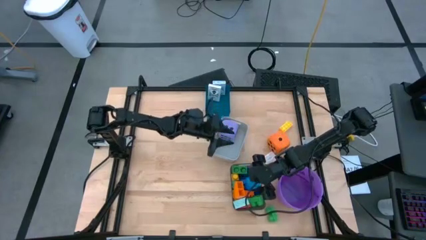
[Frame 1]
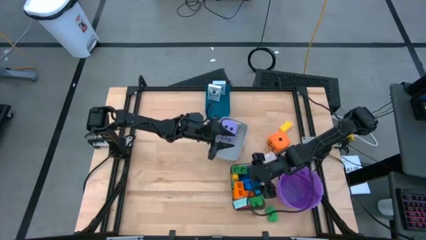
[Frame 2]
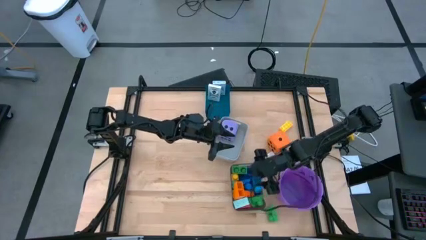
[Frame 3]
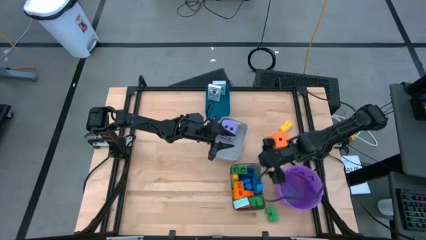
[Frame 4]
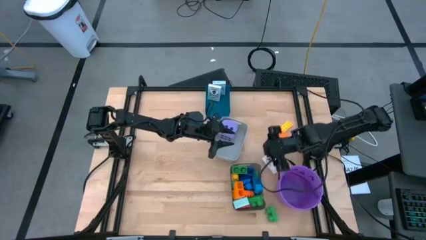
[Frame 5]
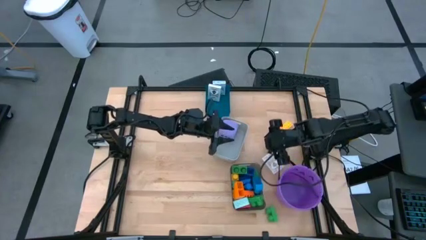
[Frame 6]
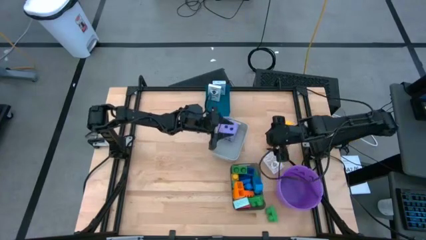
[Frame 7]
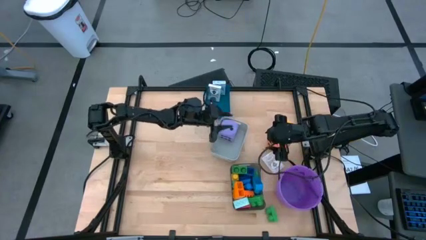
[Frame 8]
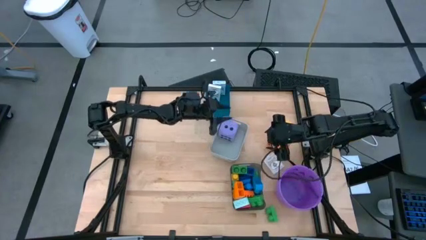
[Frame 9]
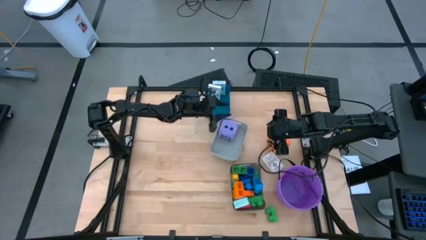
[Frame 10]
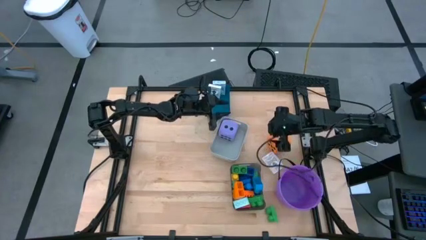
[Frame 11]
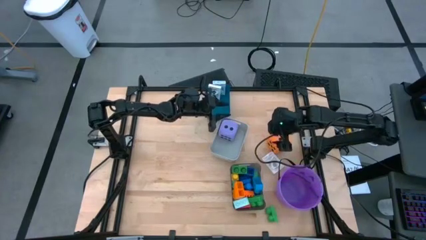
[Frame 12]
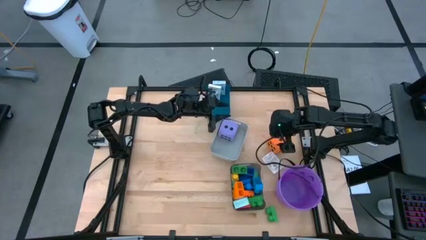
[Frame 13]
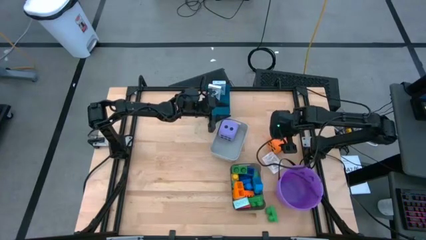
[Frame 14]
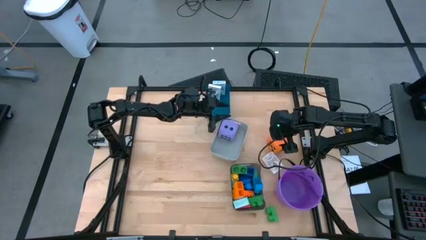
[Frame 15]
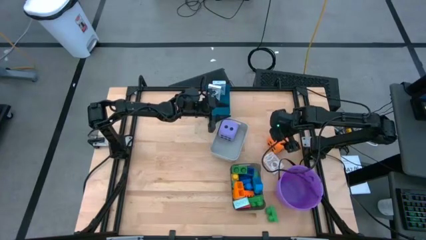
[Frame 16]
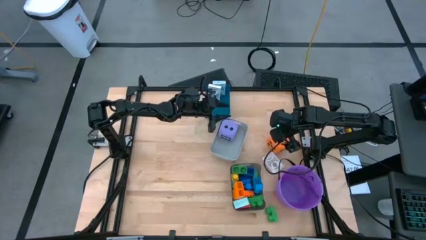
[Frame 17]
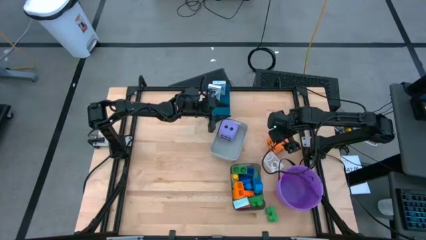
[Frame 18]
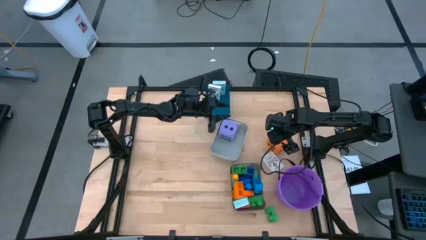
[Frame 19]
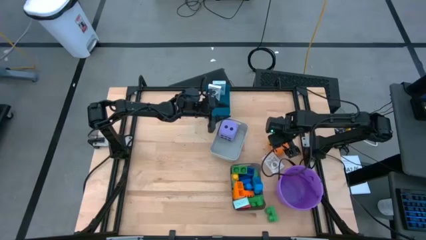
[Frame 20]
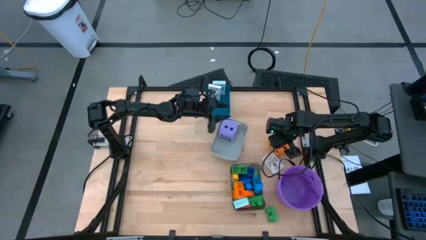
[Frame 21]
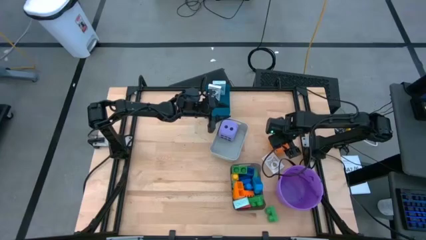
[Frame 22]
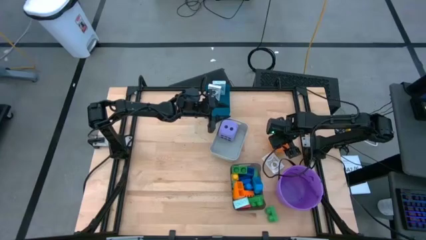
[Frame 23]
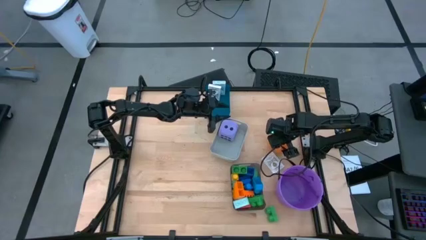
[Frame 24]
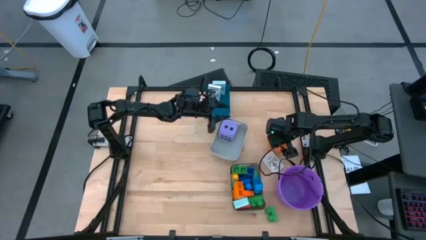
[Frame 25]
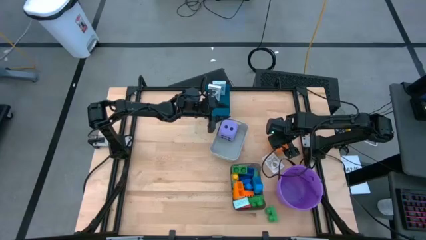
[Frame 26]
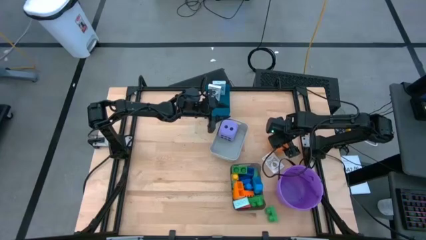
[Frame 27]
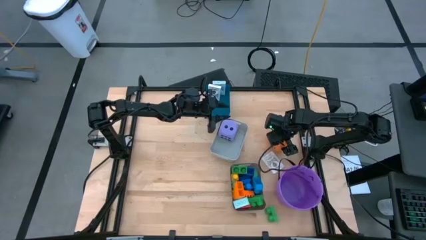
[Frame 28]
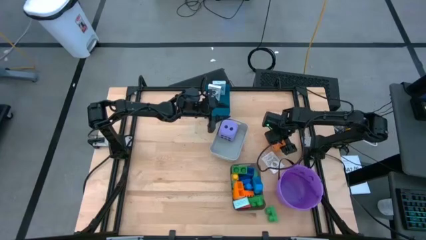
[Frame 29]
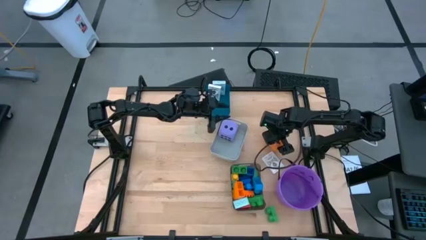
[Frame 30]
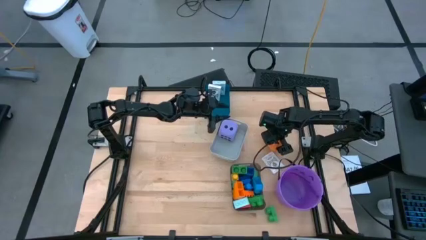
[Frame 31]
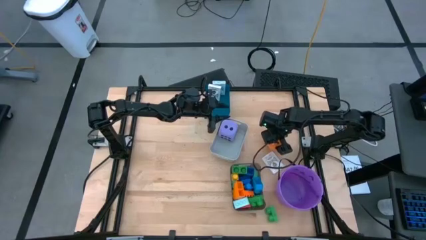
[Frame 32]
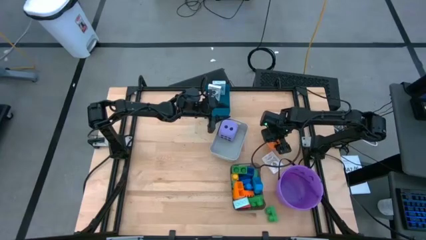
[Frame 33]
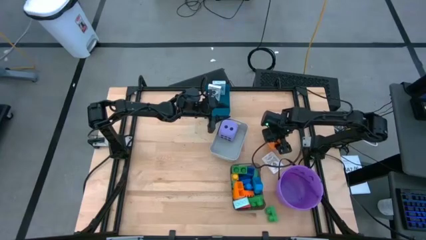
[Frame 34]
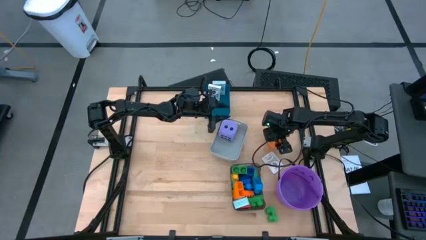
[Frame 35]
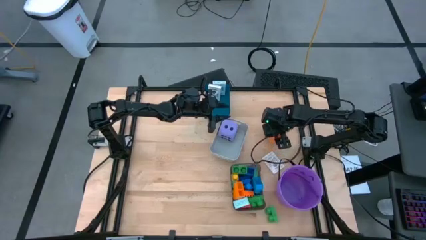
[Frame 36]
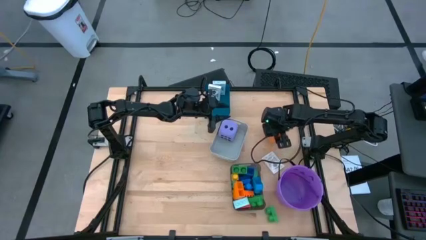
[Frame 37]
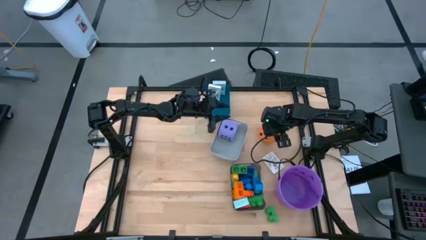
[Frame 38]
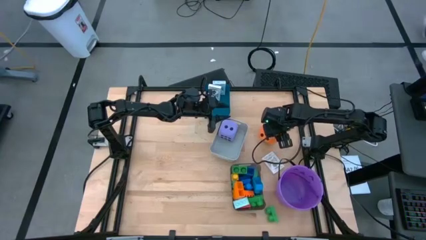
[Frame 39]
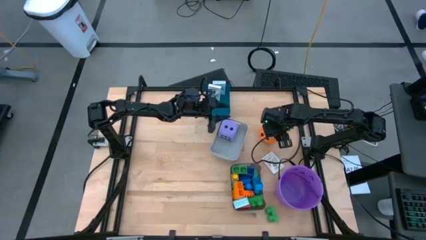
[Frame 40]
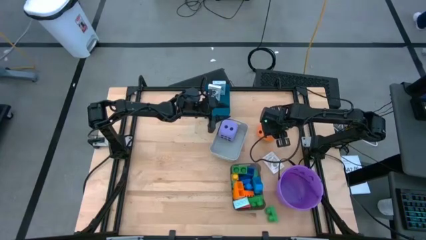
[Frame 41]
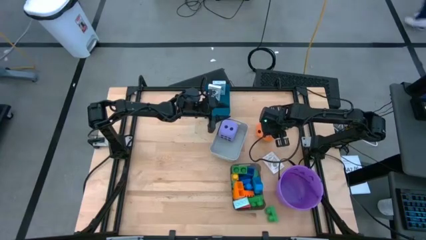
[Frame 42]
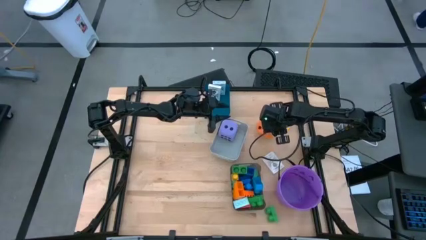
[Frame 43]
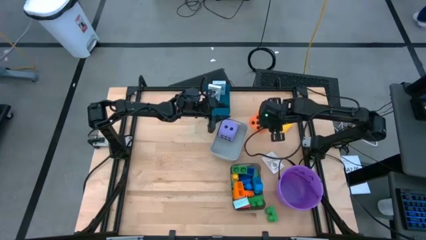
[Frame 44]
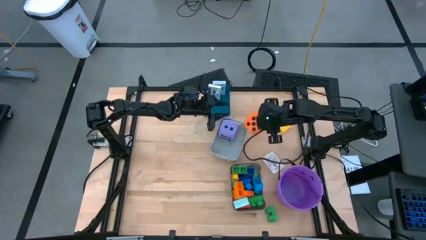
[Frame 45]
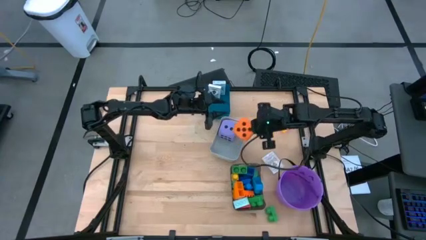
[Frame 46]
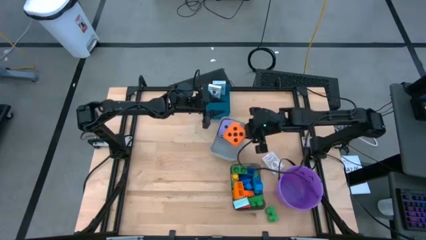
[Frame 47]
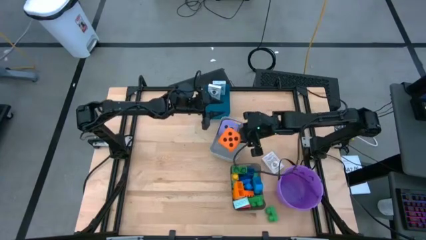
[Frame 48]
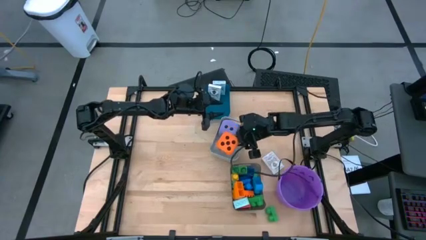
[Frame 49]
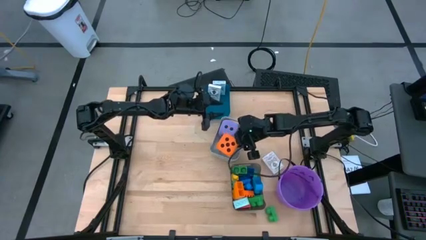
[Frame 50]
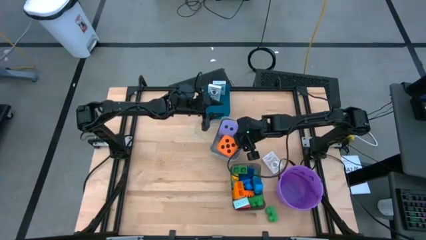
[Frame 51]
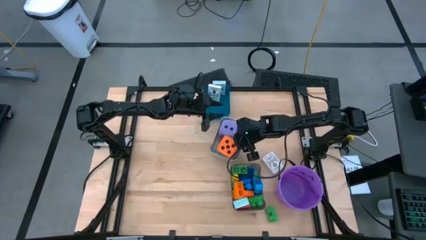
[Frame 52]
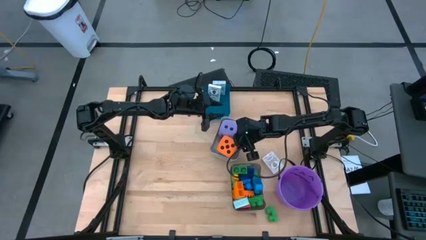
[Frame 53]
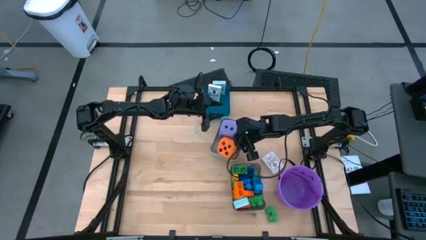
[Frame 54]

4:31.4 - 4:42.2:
Task: Pick & Place Toys
Put the orange dice into the white bin

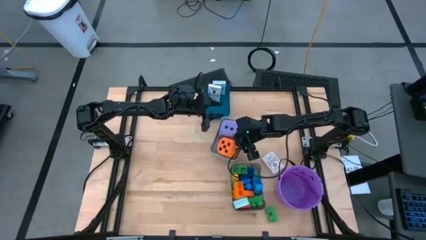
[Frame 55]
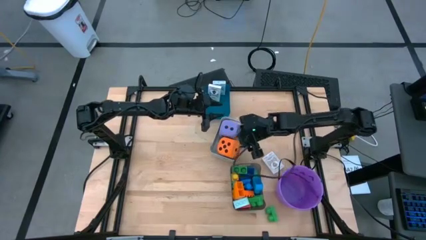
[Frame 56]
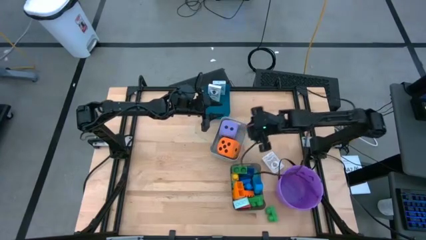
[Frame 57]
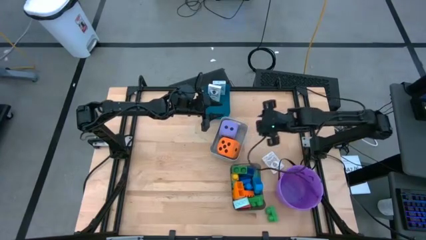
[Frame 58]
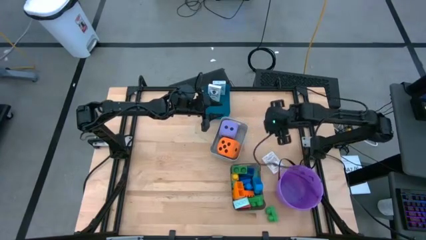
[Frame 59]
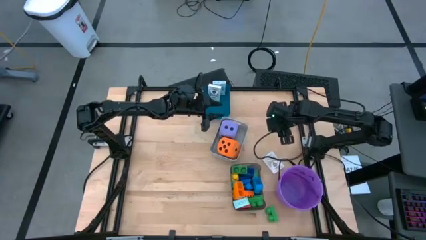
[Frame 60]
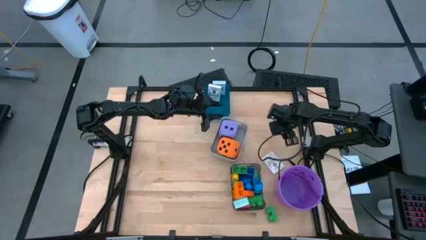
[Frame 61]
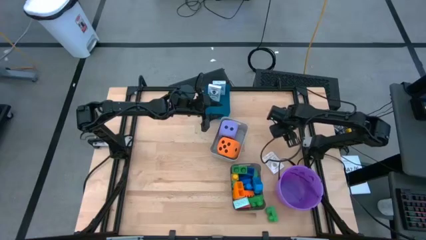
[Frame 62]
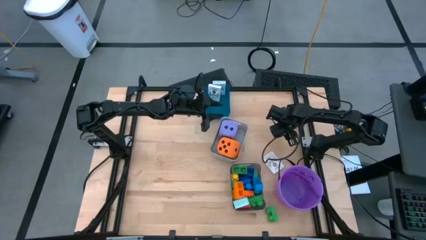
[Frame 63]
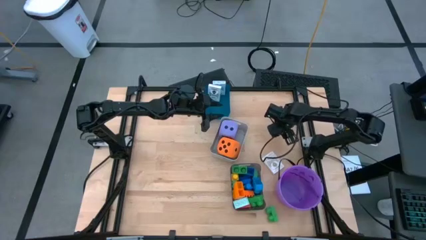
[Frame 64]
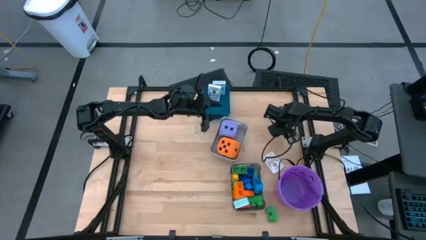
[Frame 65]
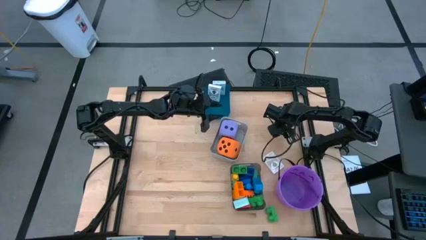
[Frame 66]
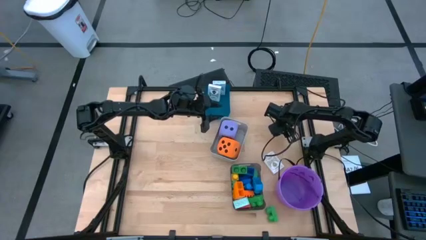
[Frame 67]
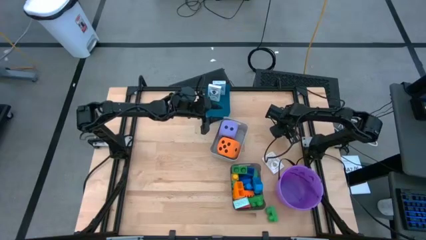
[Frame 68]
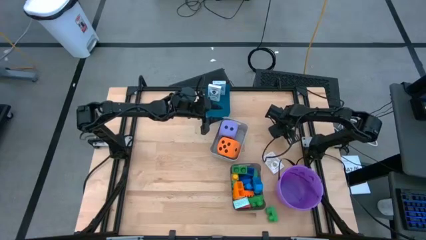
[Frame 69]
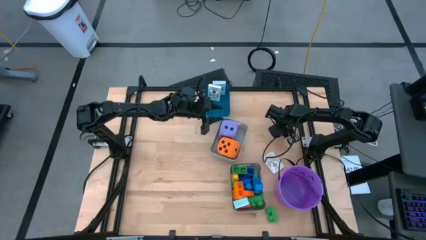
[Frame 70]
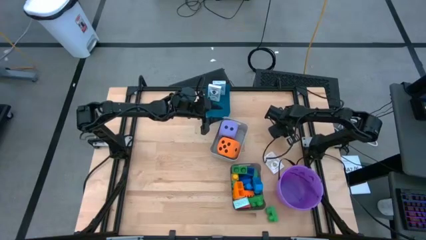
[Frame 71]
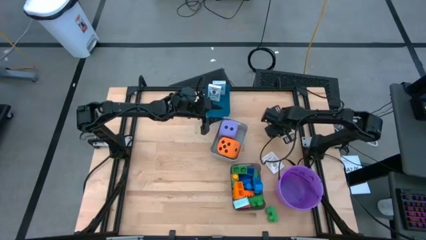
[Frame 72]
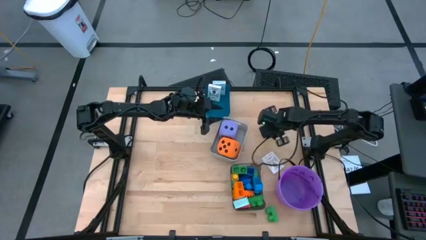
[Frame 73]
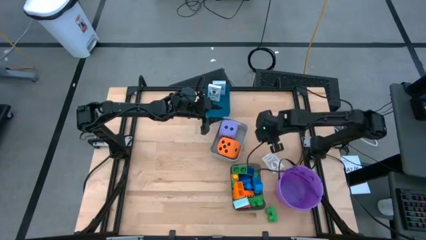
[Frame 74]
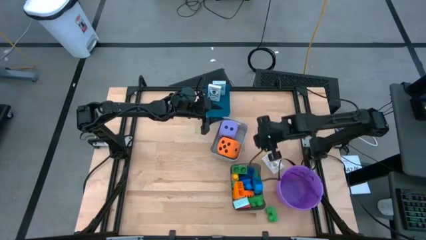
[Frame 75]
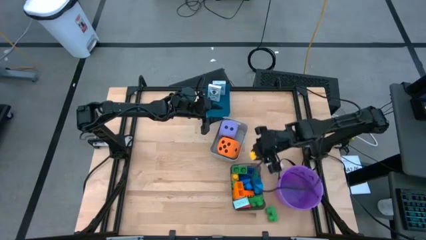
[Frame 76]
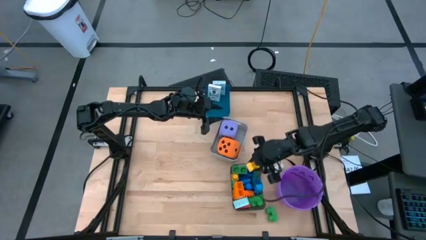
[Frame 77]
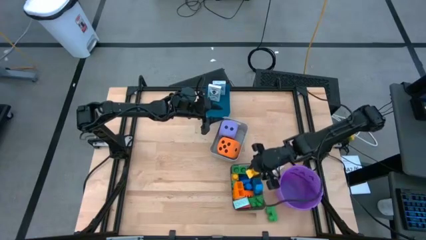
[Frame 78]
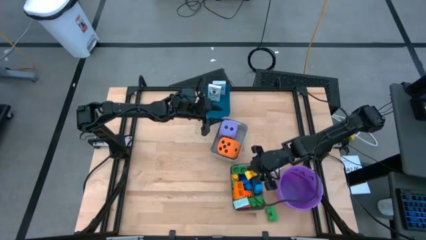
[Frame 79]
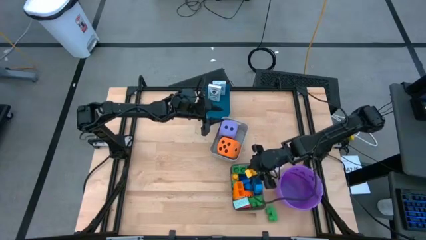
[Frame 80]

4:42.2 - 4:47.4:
Put the yellow game piece into the black bin

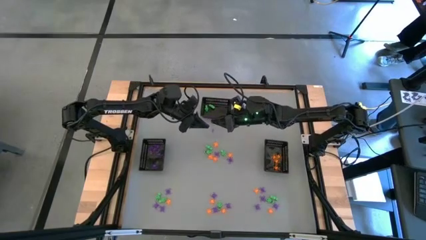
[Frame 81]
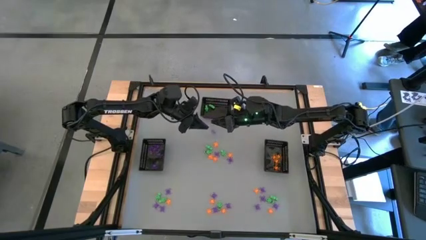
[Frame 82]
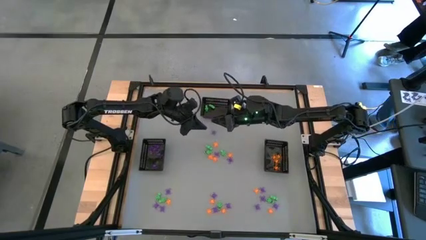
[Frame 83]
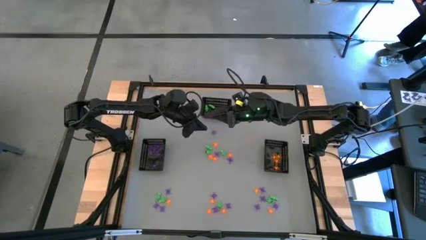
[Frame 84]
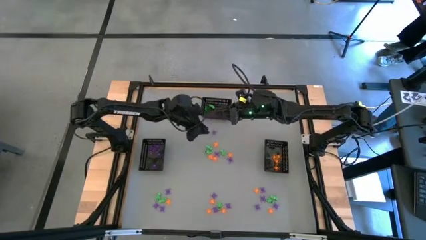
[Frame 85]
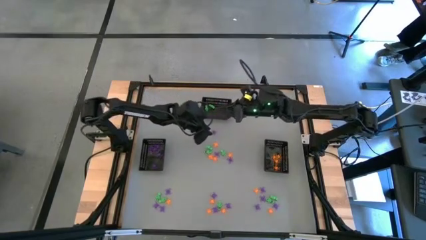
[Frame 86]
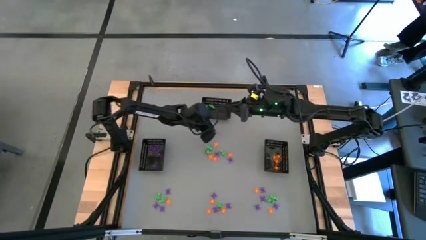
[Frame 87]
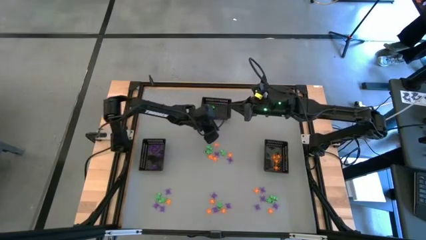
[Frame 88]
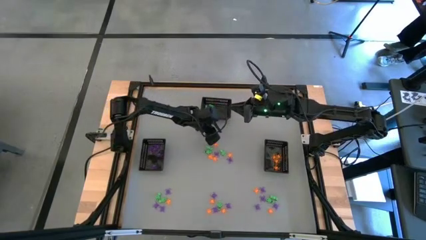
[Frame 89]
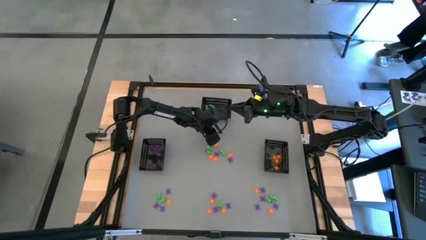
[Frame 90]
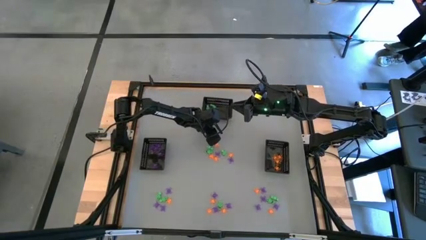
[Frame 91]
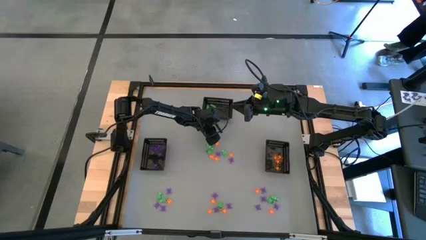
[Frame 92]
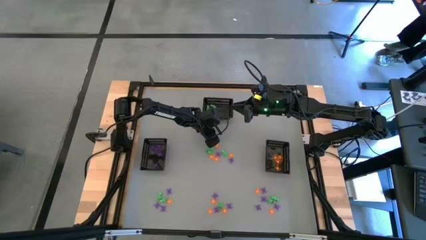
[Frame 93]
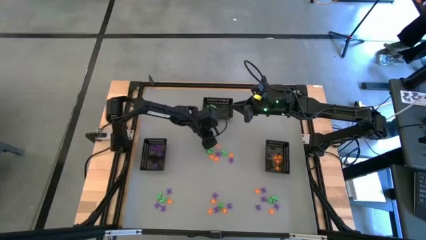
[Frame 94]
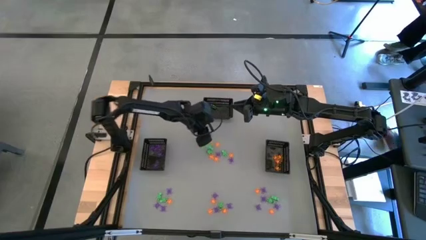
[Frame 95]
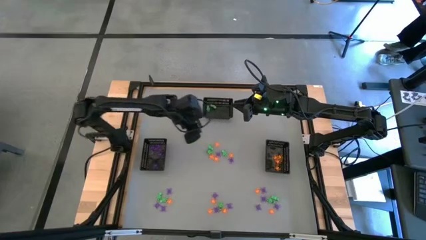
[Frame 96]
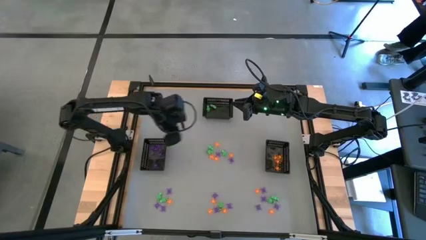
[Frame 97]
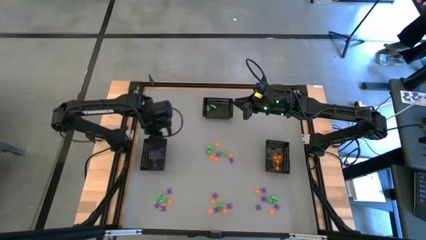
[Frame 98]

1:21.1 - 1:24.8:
Task: Sort Halloween decoration
Put the violet spider toy into the left bin
